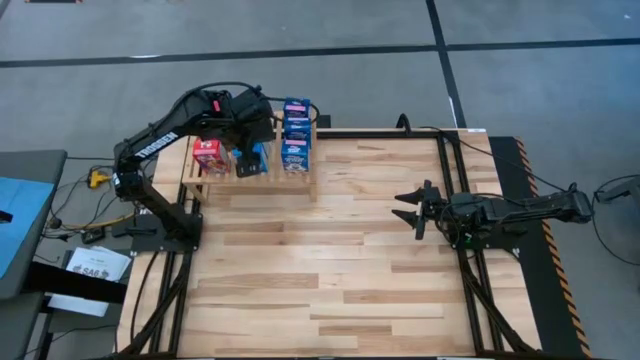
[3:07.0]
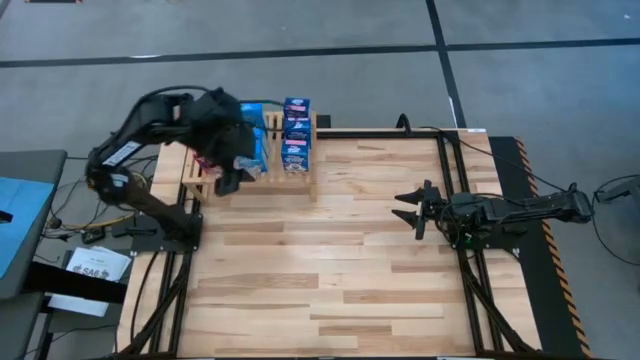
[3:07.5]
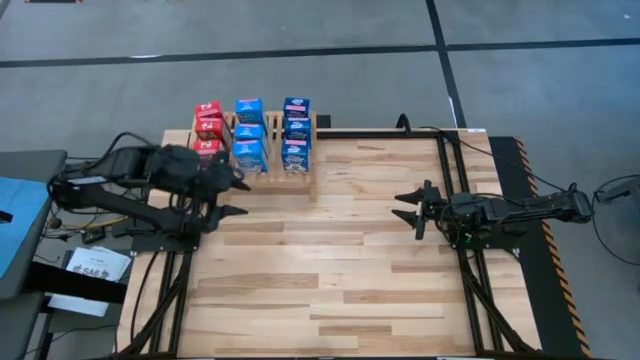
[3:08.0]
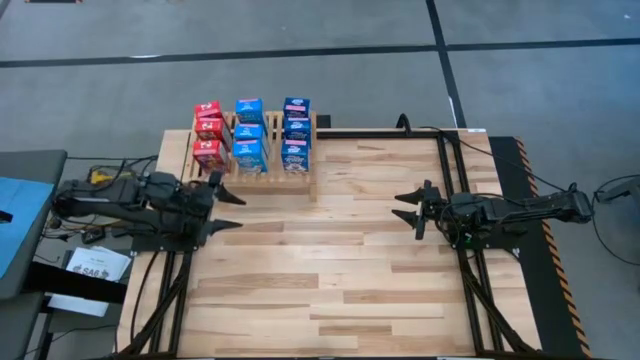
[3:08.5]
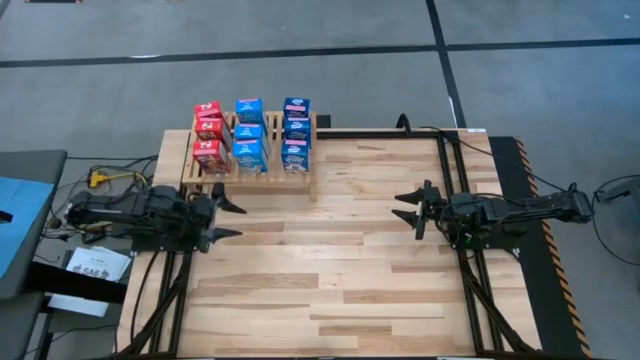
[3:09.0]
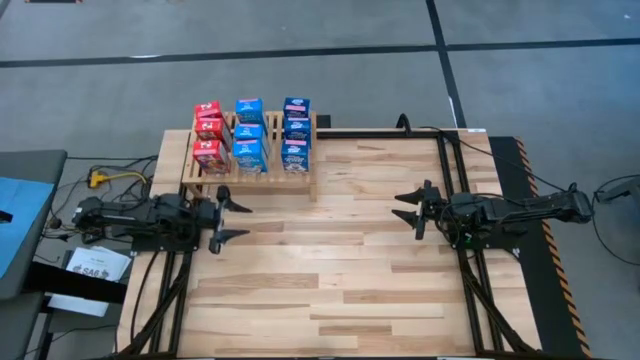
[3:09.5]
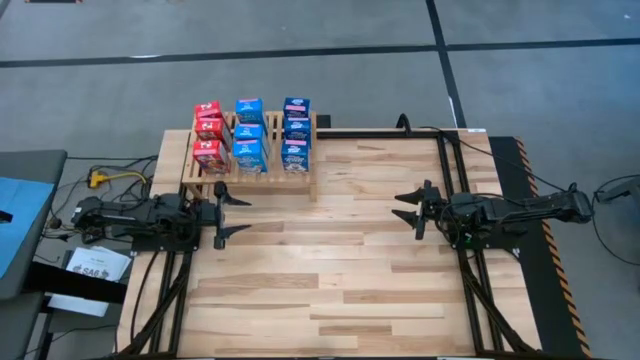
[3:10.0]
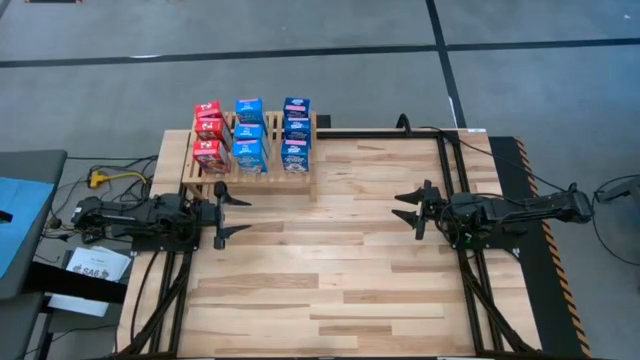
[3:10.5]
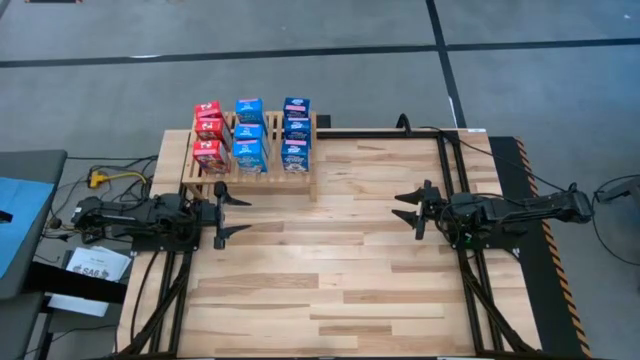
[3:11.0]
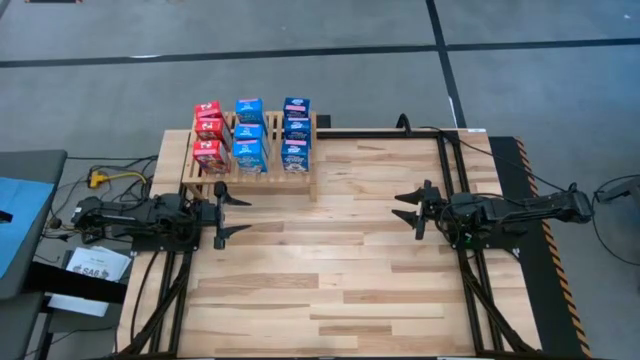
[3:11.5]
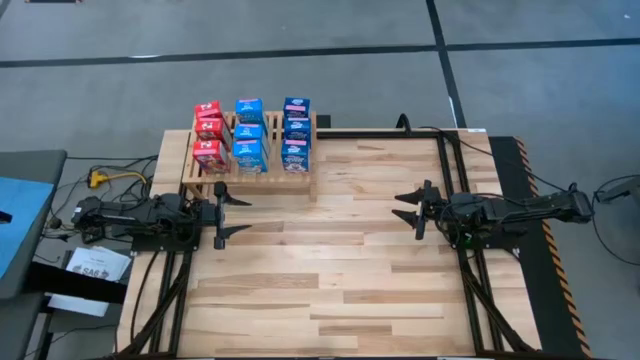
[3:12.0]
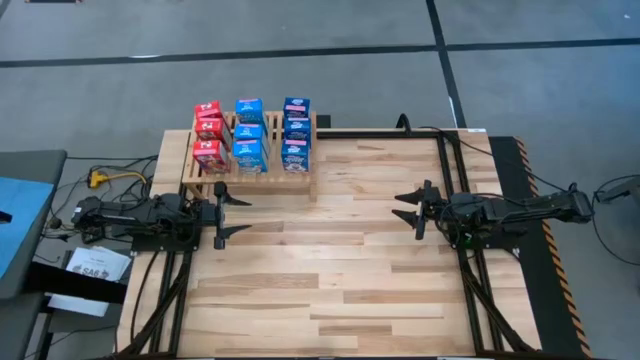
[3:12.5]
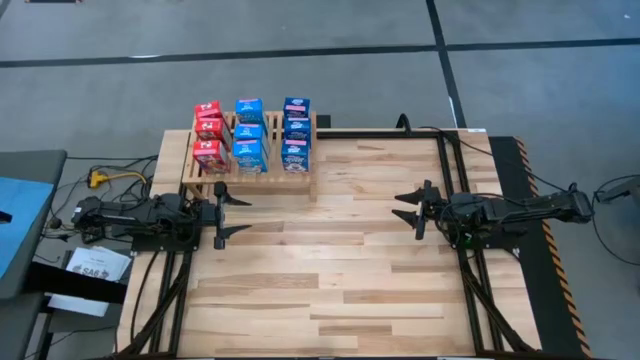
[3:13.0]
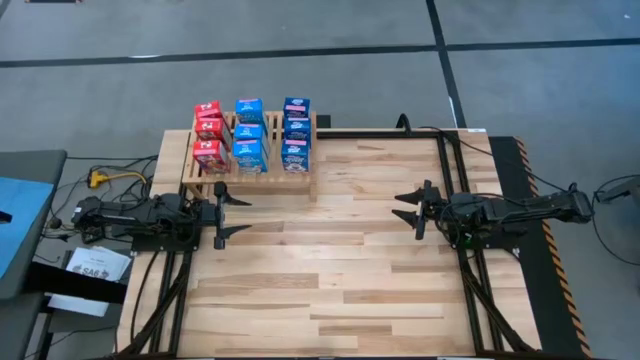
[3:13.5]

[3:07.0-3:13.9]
Task: Stack cereal on shelf
Return to Home Position

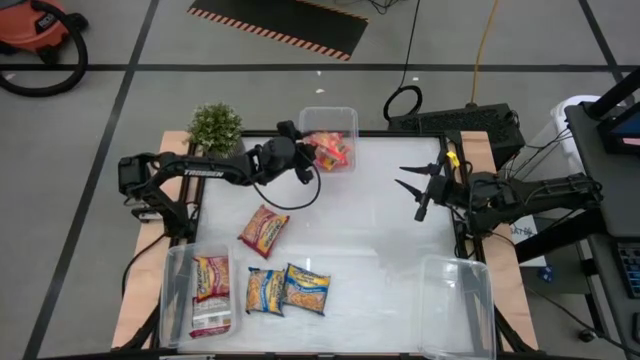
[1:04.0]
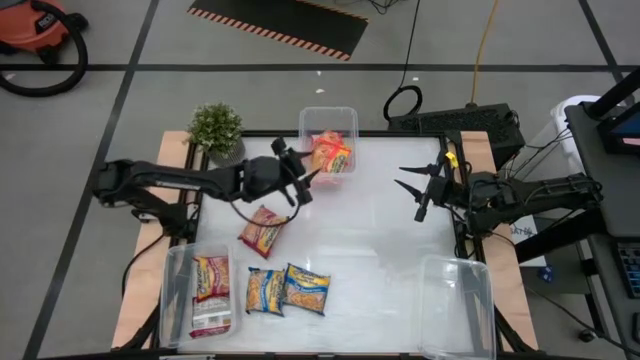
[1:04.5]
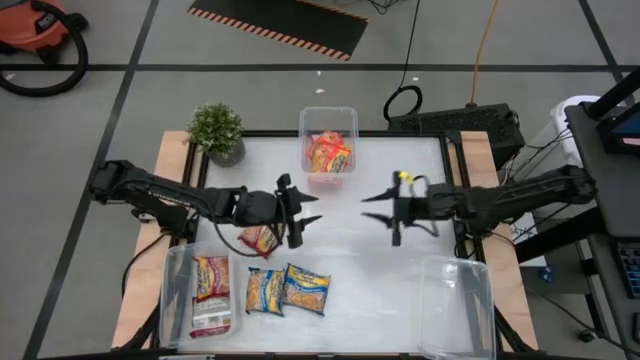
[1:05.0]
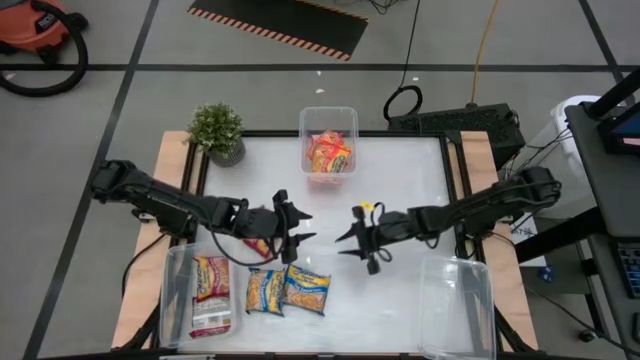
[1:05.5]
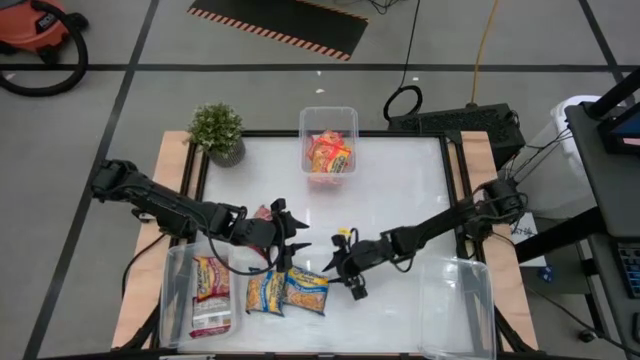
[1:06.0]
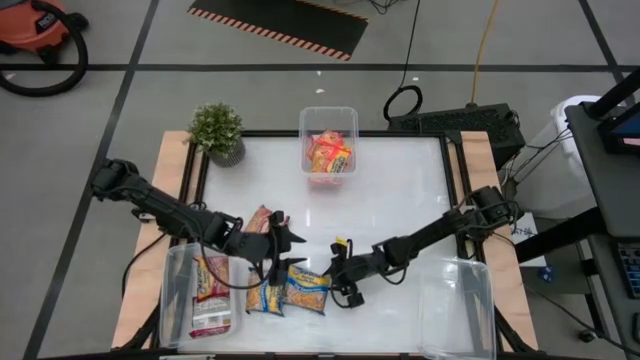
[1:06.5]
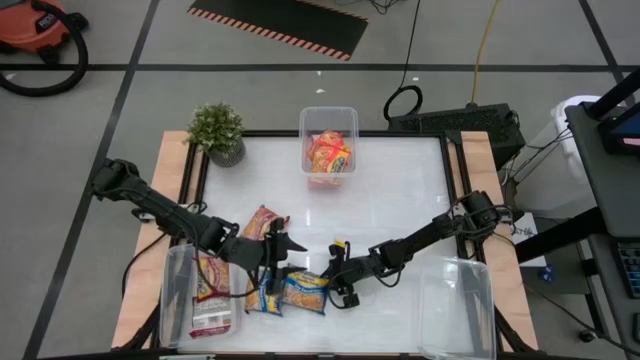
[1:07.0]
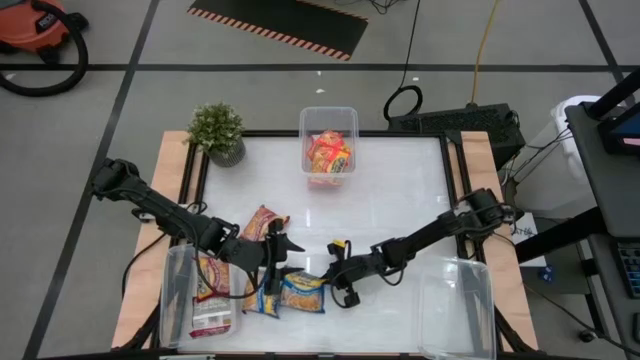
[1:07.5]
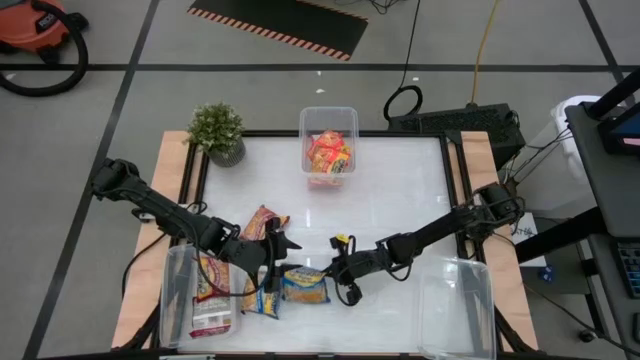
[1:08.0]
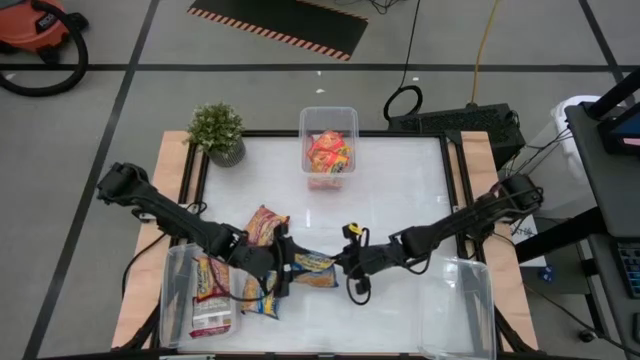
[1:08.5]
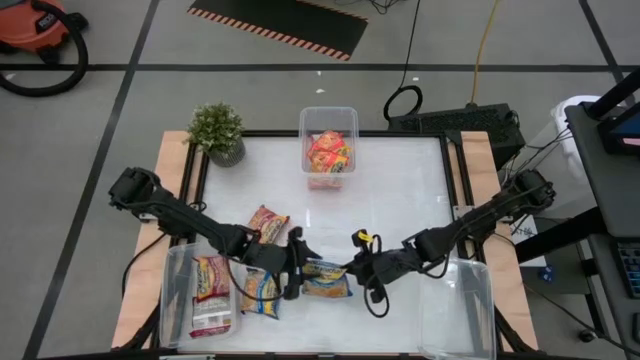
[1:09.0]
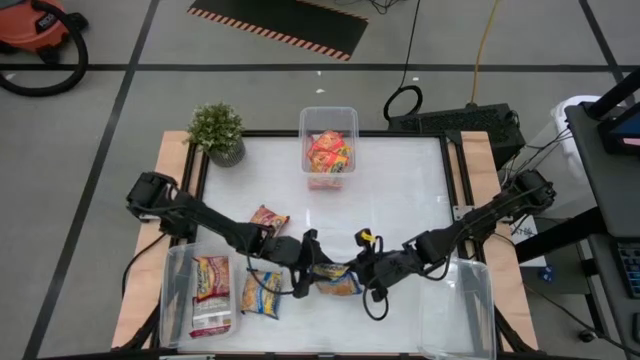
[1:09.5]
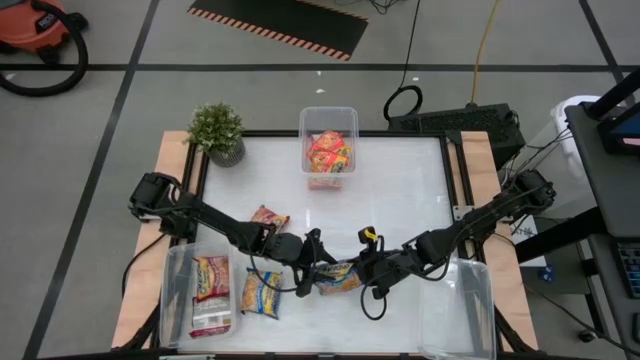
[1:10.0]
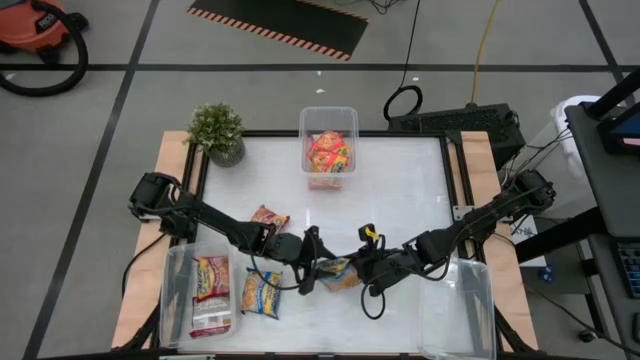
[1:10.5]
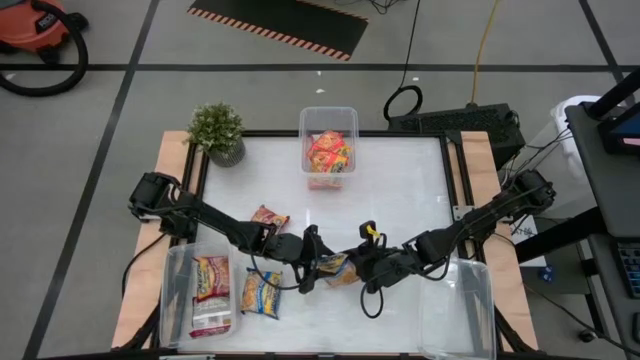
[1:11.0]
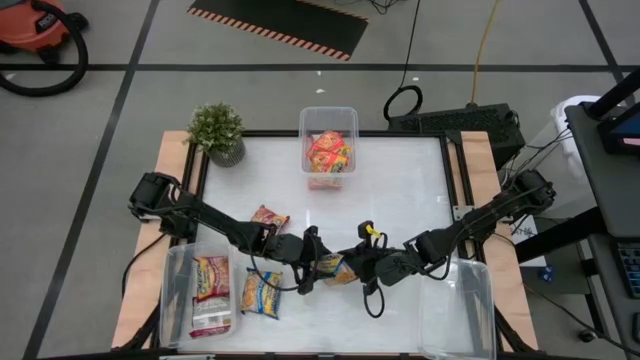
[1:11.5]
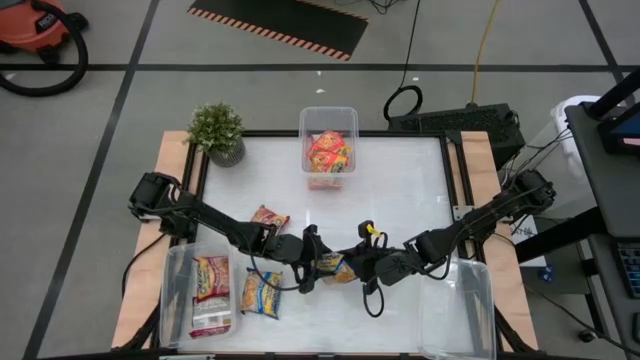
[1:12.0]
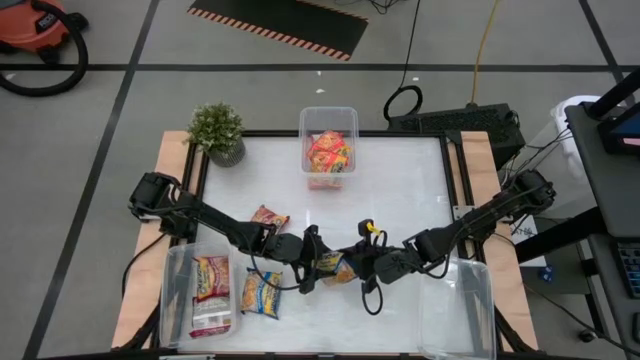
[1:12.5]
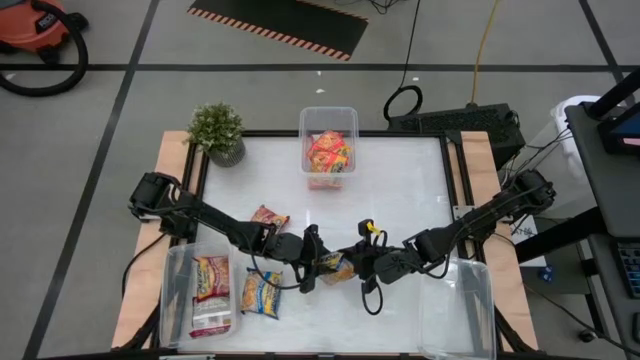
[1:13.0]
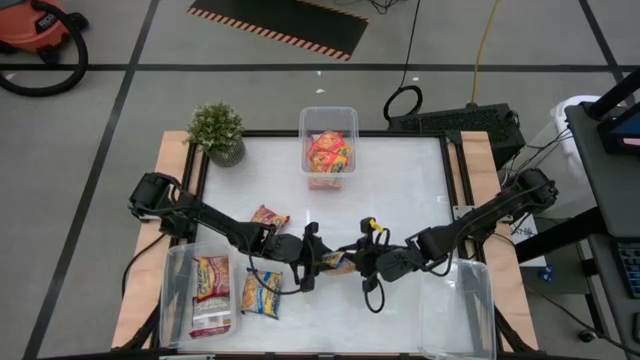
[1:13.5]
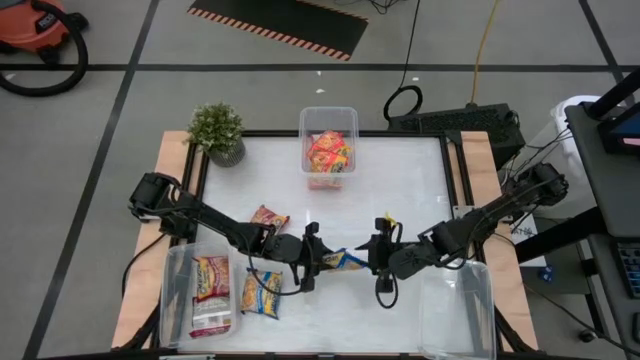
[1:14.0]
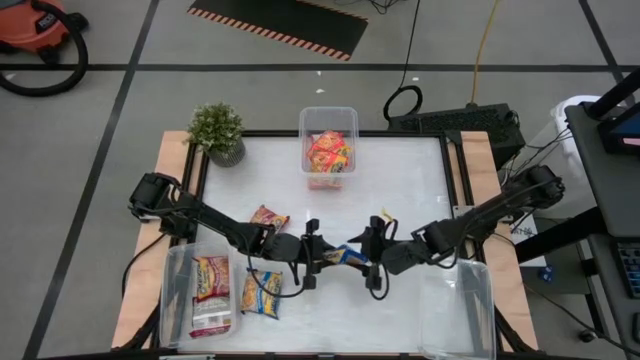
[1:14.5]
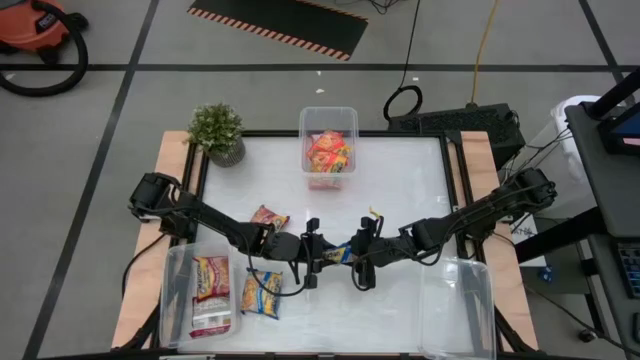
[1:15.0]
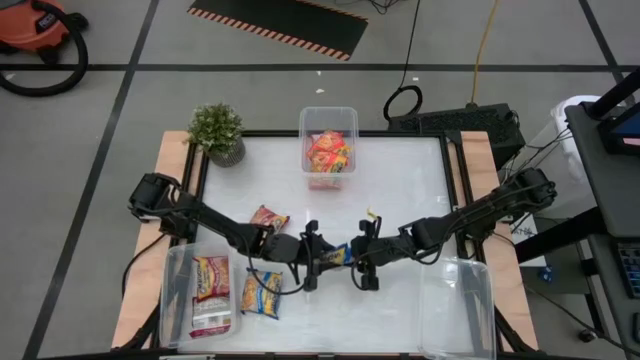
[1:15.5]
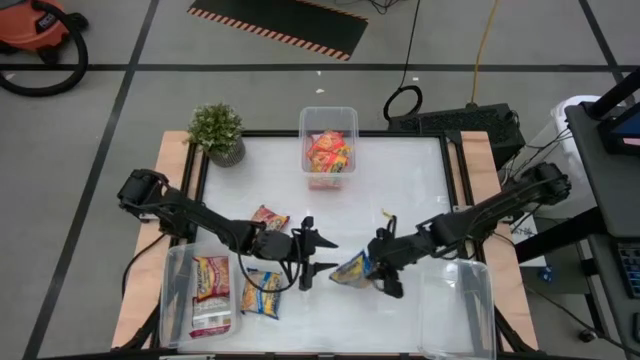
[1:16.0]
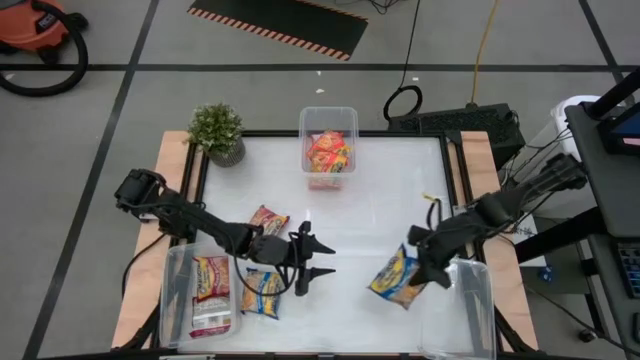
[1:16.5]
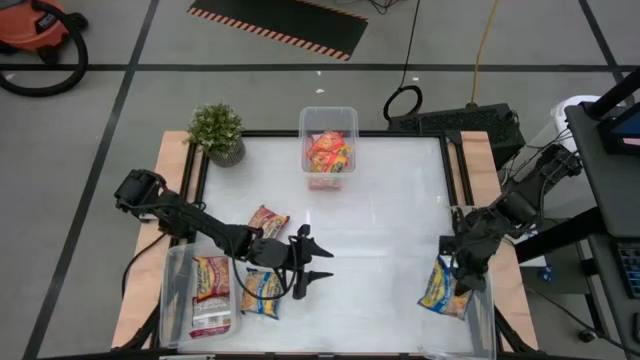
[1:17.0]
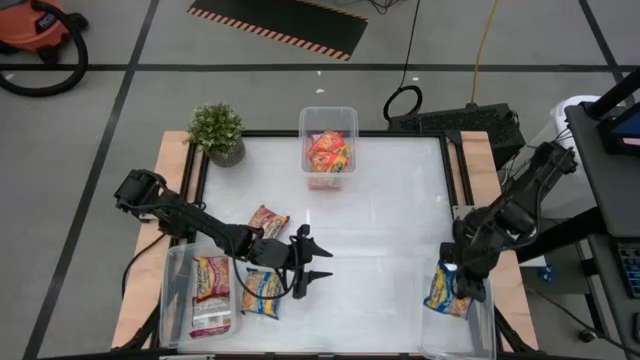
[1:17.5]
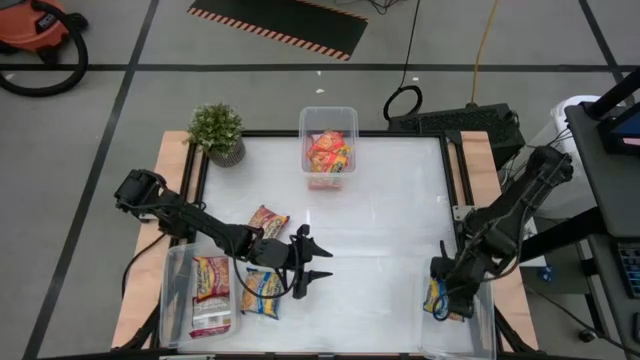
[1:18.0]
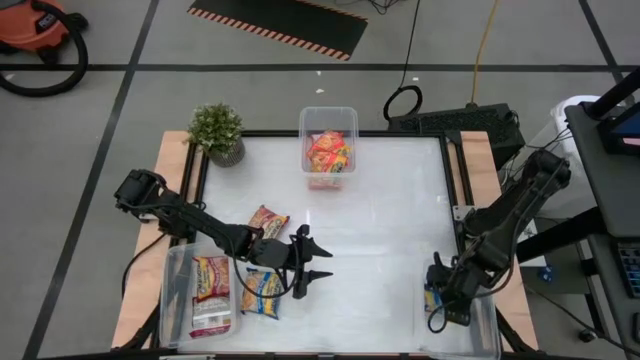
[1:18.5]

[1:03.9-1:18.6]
Task: Sort Maruchan noodles
Put the right blue noodle pack into the bottom right transparent bin
